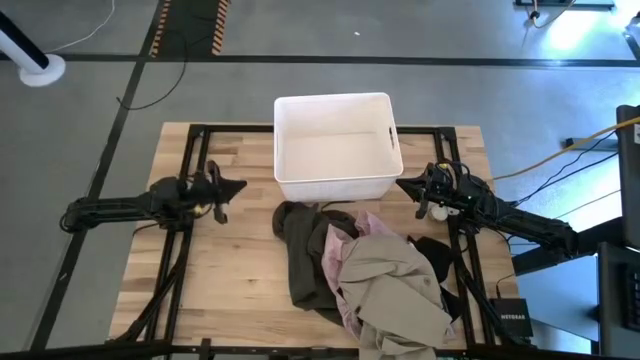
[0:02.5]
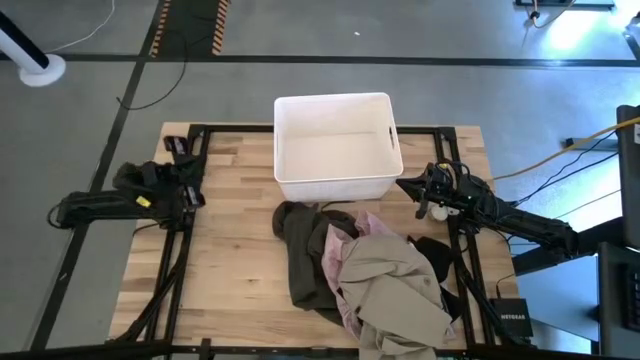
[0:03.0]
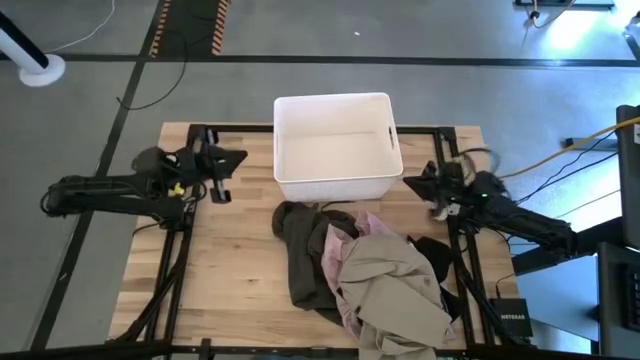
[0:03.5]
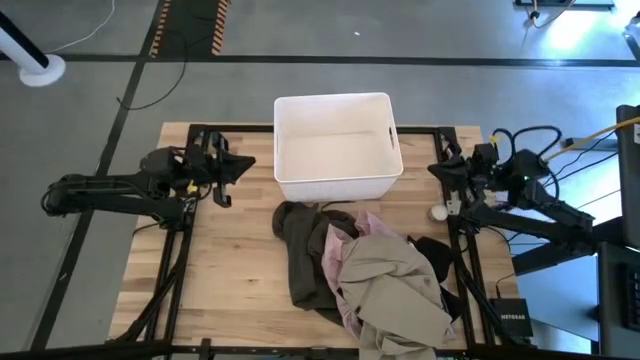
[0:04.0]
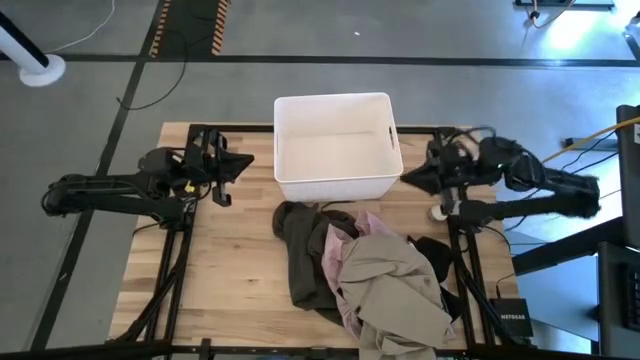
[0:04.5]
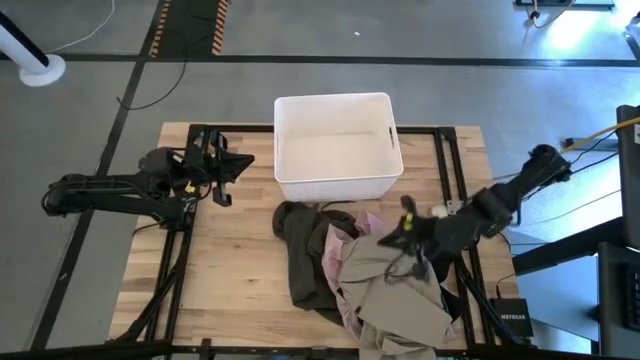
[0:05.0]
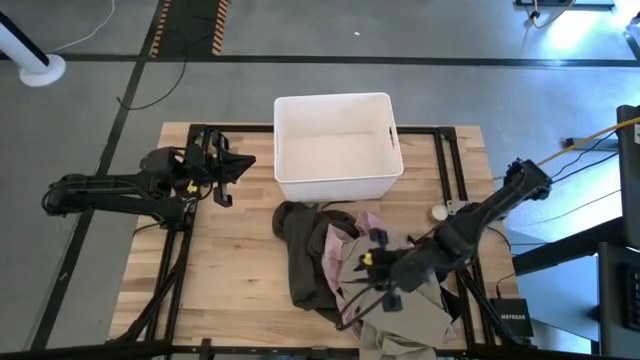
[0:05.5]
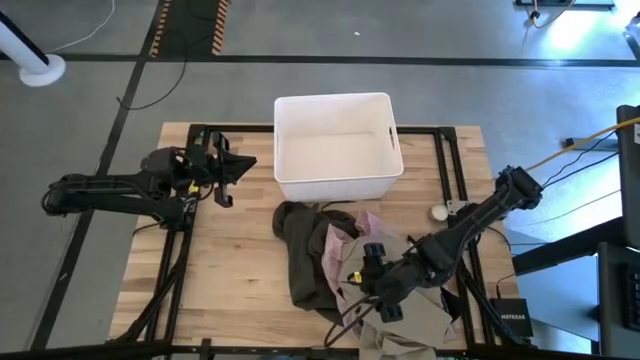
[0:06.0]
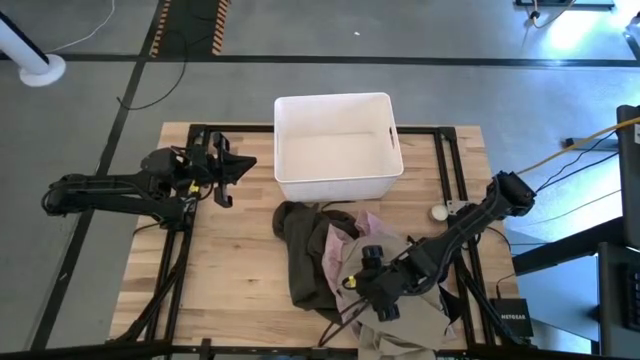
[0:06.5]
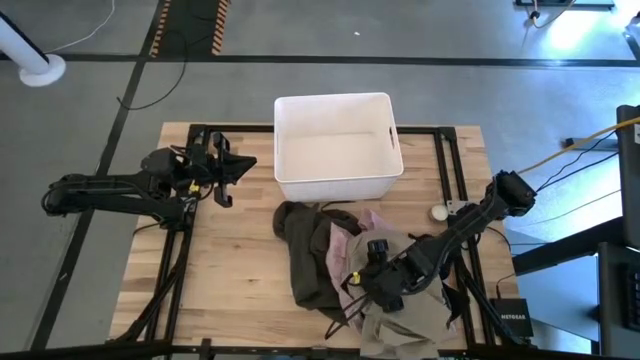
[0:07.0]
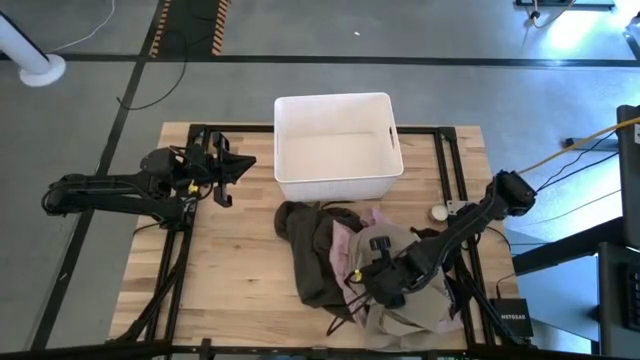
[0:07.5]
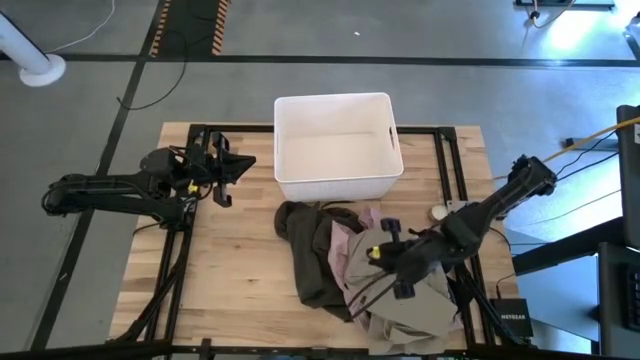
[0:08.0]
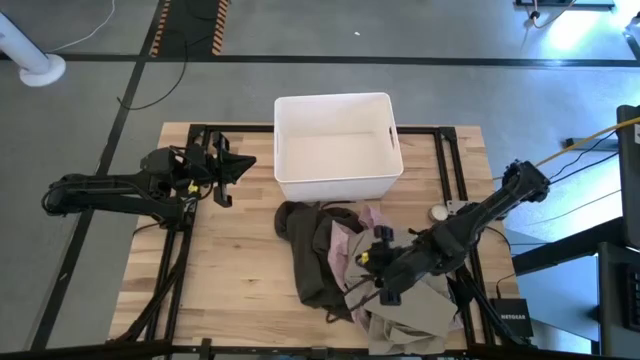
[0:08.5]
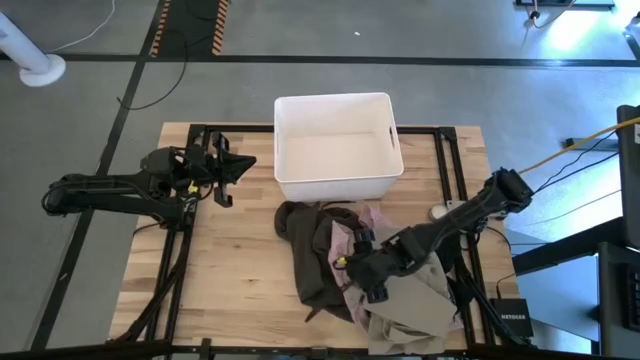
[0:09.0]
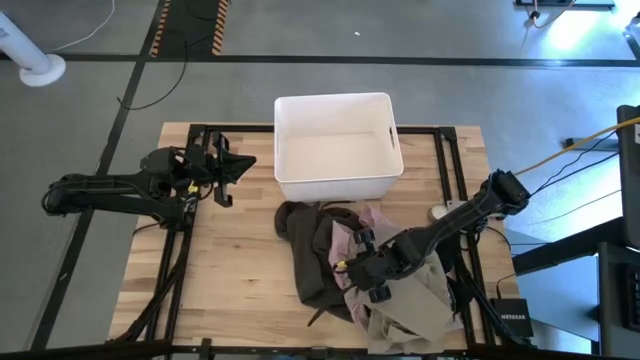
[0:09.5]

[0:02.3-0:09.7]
Task: Sort clothes
Put the brown pants into the white laundry bin

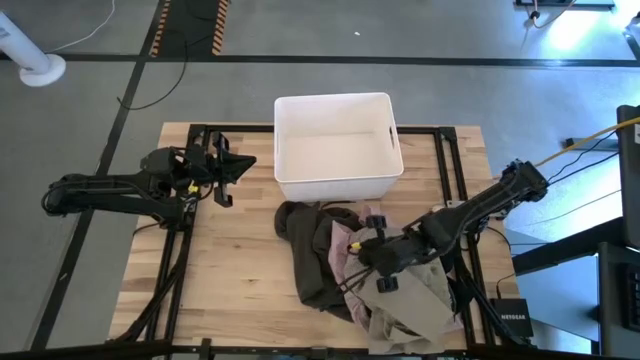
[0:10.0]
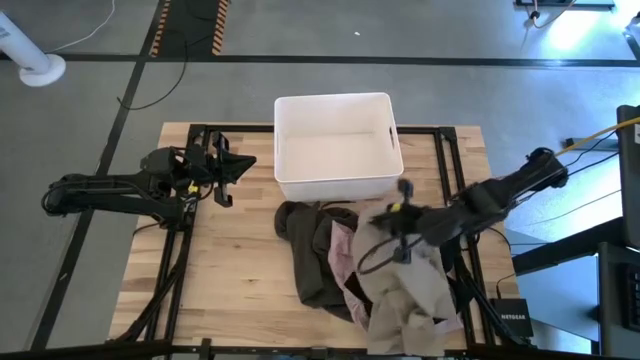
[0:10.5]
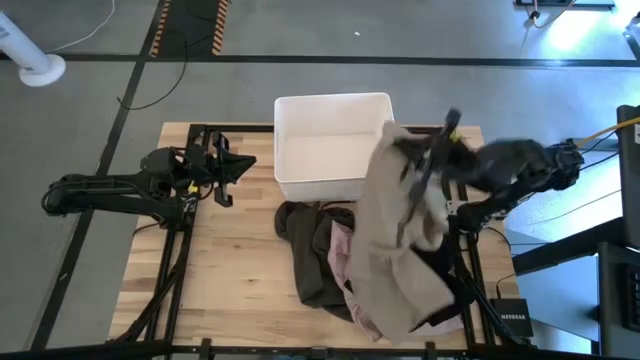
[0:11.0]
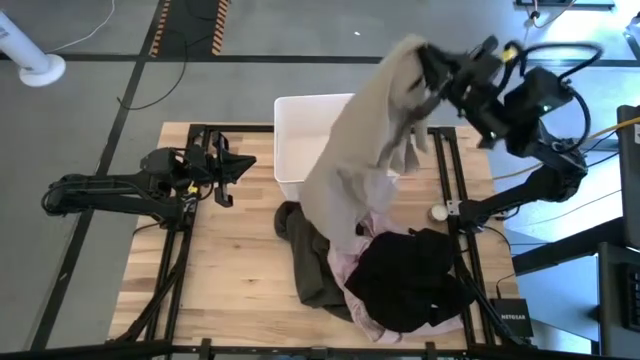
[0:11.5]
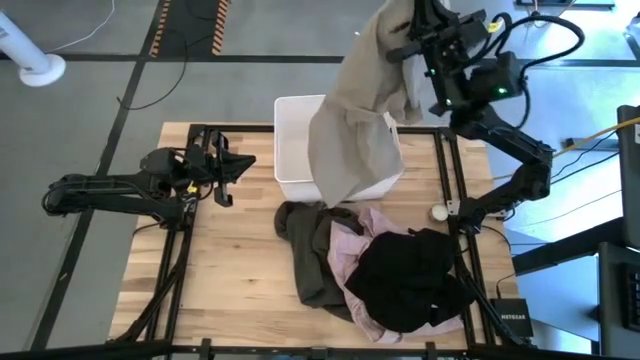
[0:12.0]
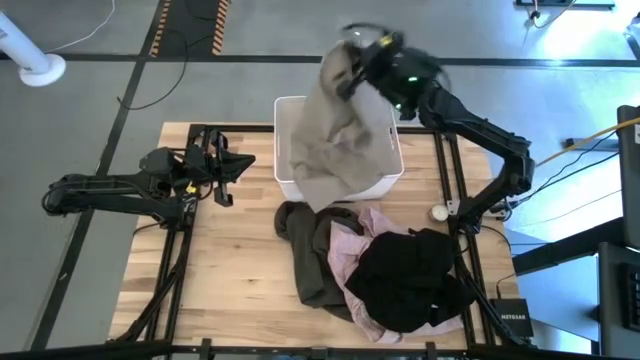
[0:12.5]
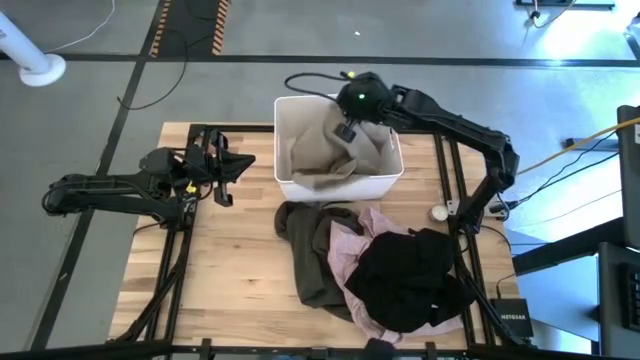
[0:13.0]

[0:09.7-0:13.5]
Put the brown pants into the white laundry bin

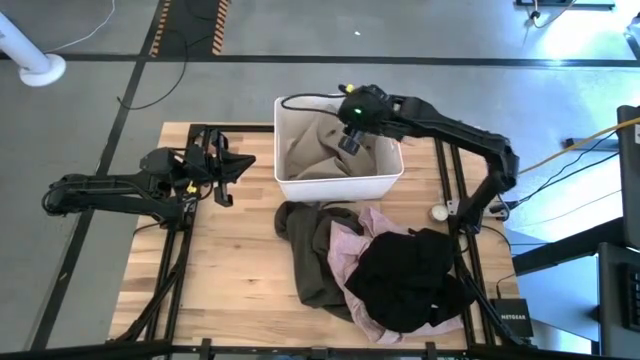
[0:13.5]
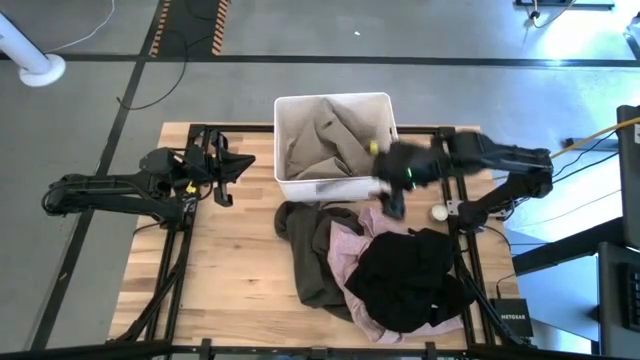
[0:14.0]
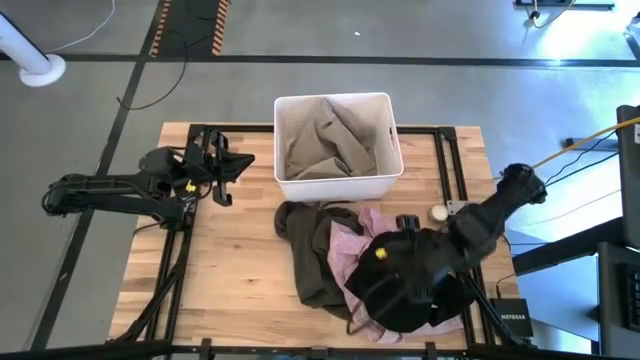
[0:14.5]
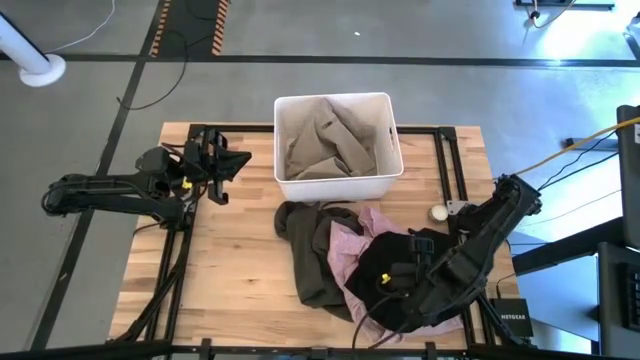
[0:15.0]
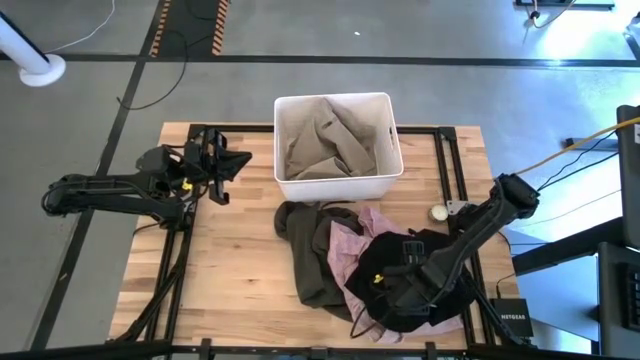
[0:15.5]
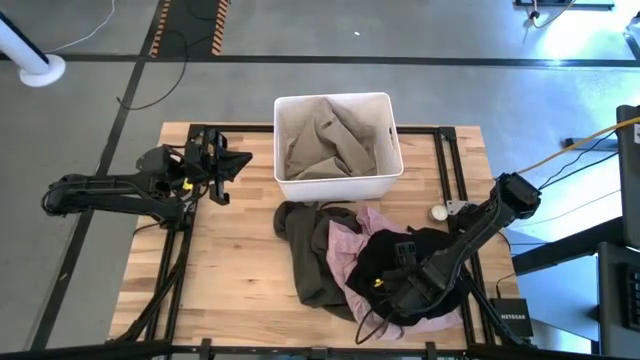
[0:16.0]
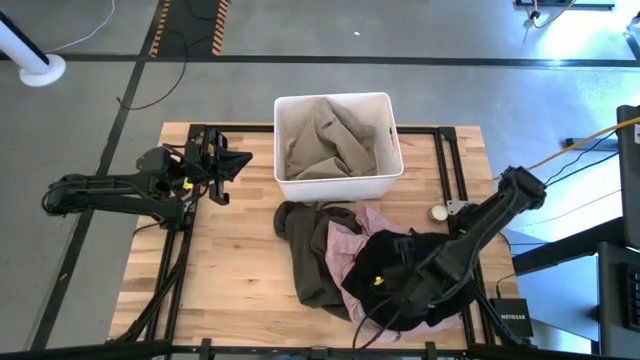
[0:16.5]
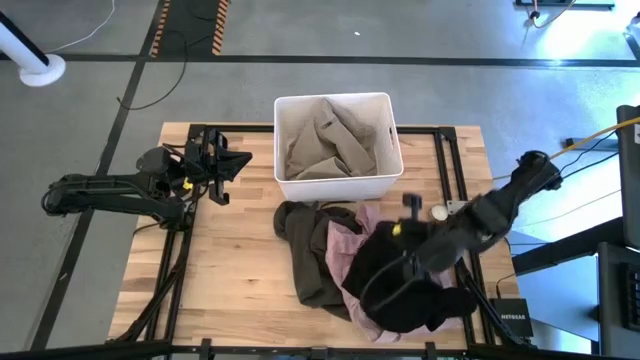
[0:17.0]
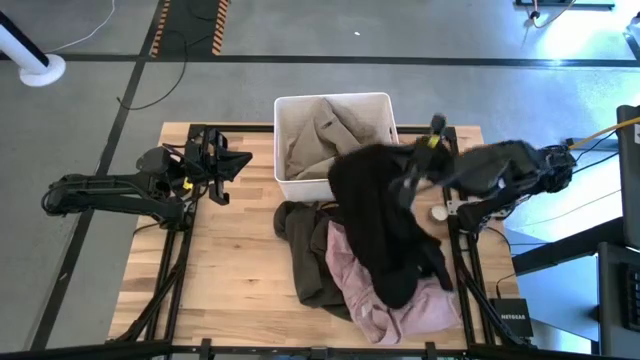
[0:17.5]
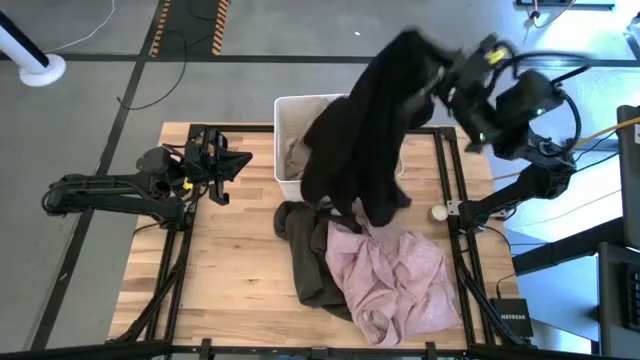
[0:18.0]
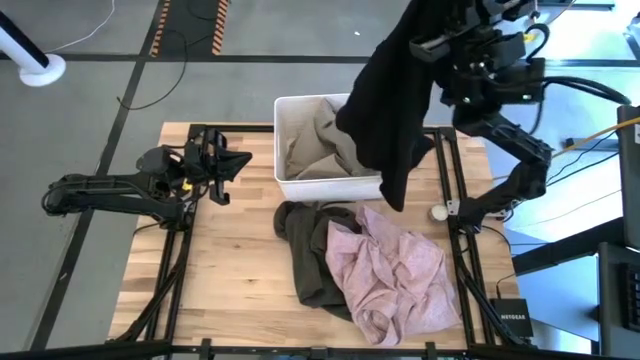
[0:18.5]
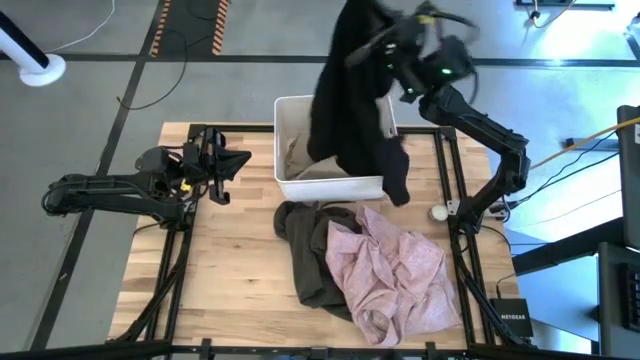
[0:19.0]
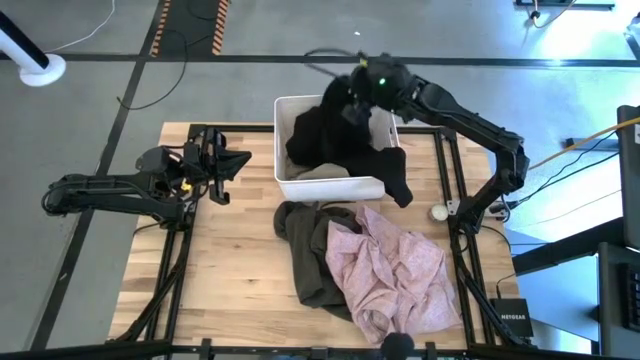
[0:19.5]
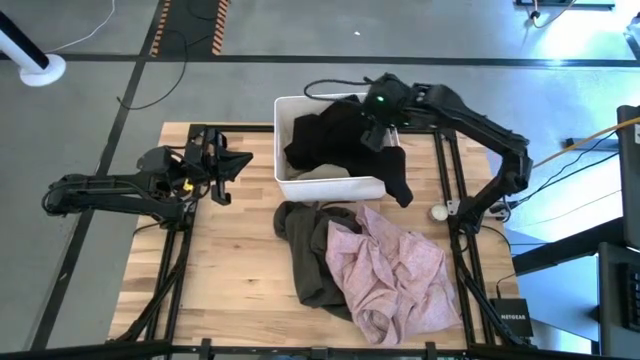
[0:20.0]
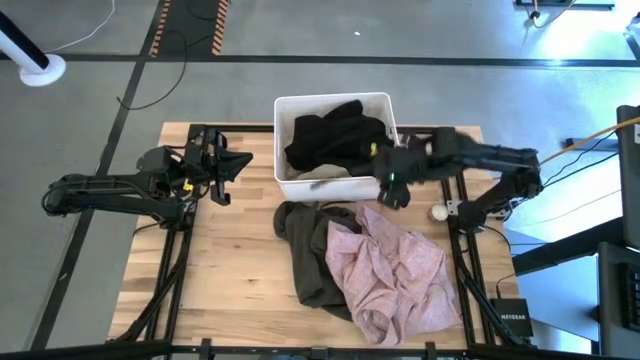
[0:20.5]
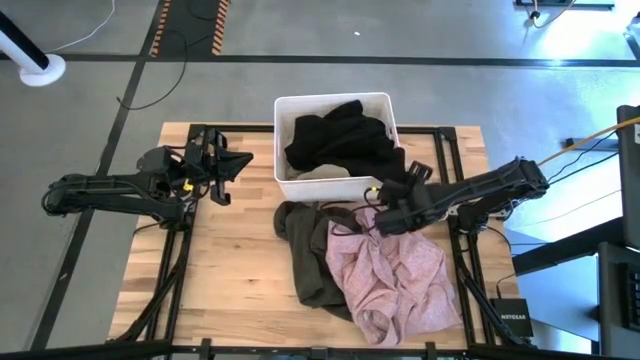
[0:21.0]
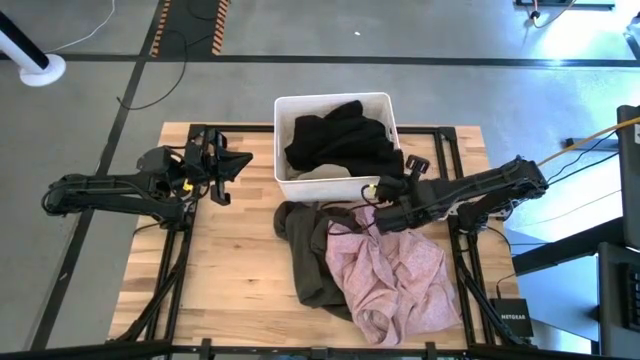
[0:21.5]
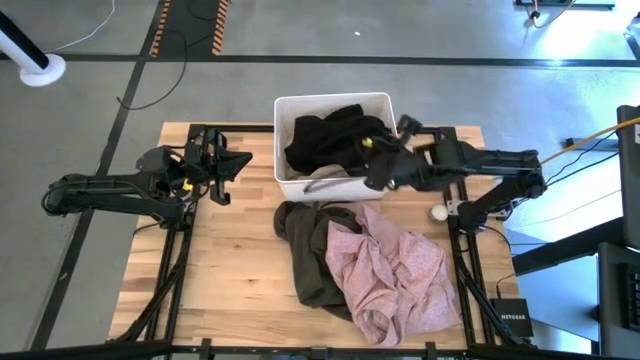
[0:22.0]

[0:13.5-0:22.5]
Put the black shirt into the white laundry bin
